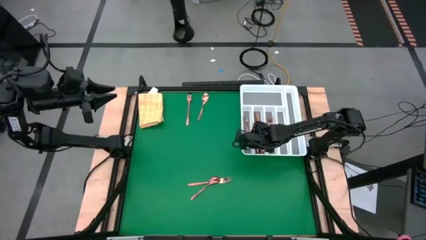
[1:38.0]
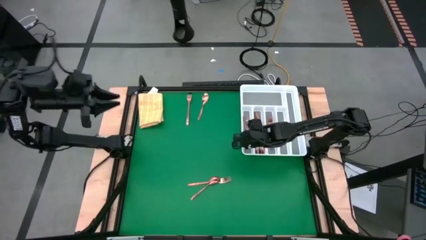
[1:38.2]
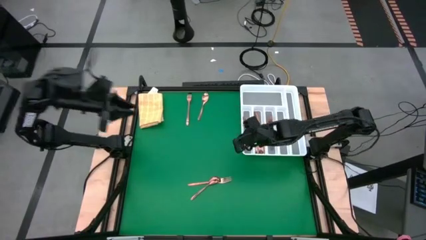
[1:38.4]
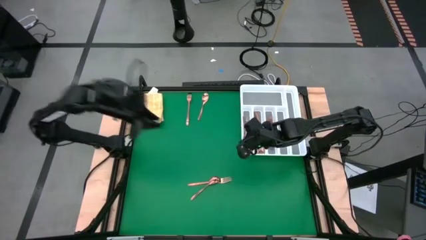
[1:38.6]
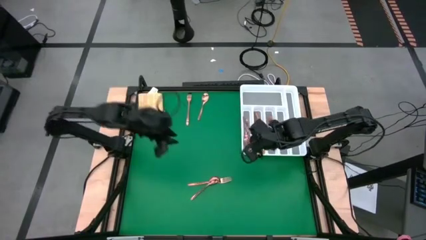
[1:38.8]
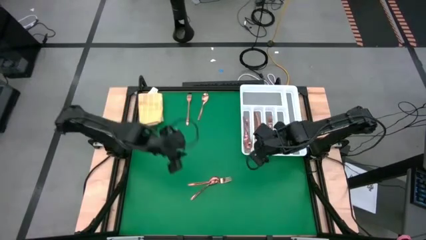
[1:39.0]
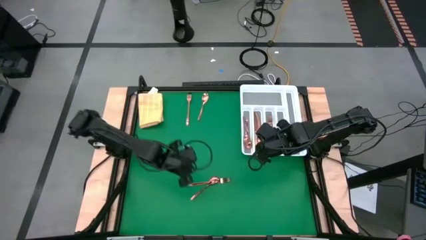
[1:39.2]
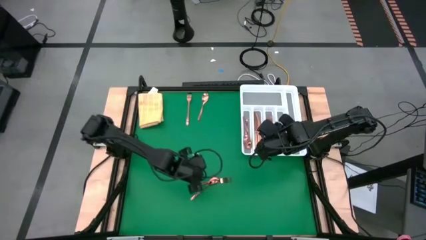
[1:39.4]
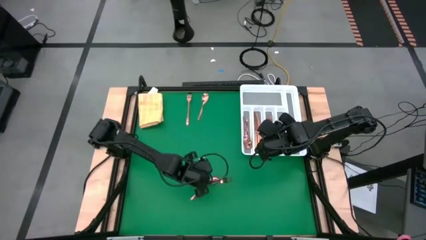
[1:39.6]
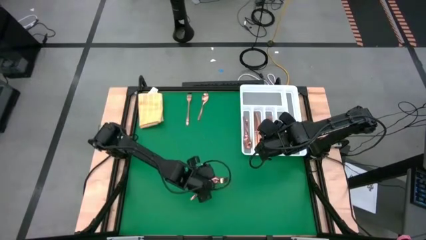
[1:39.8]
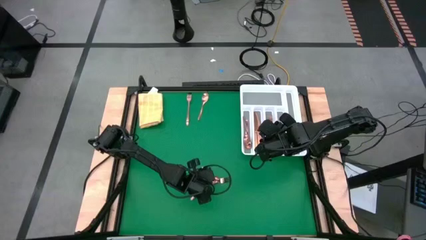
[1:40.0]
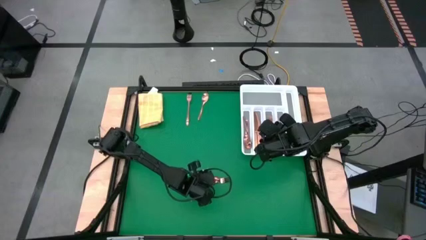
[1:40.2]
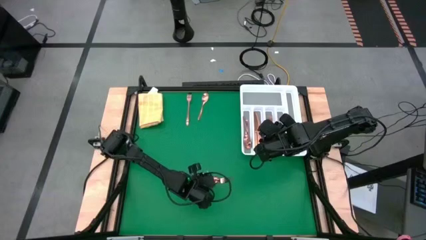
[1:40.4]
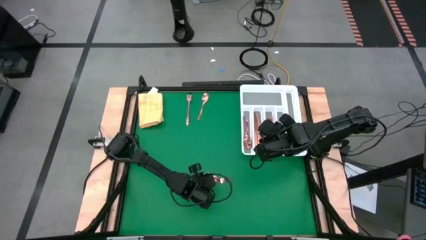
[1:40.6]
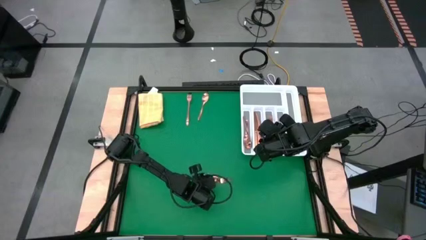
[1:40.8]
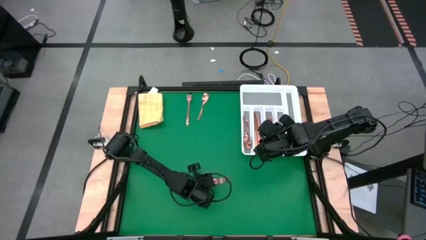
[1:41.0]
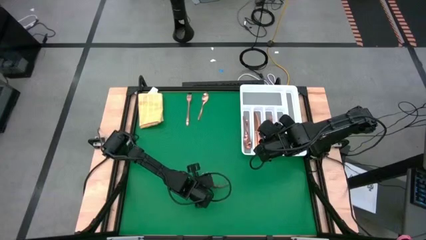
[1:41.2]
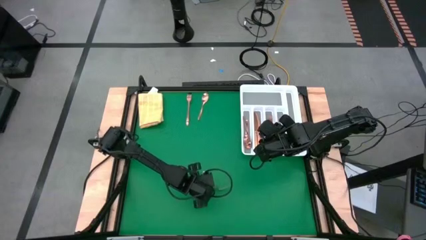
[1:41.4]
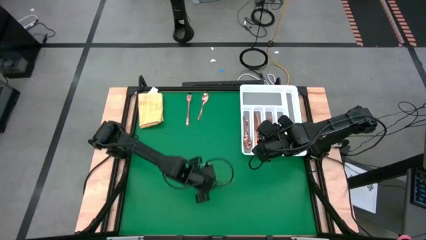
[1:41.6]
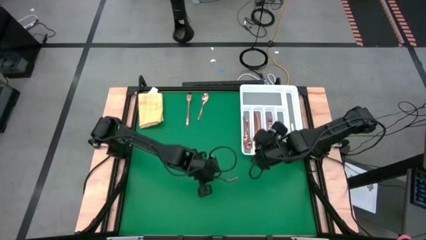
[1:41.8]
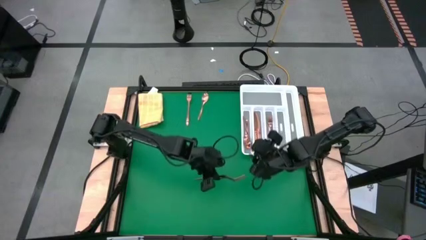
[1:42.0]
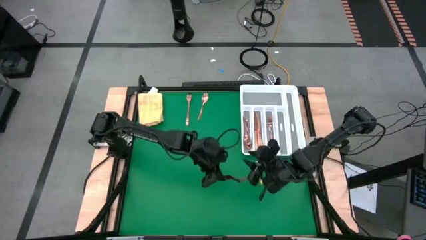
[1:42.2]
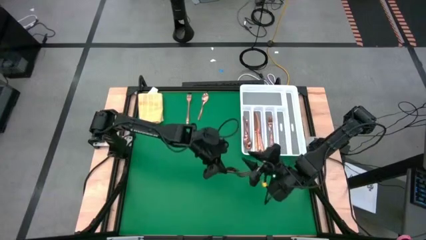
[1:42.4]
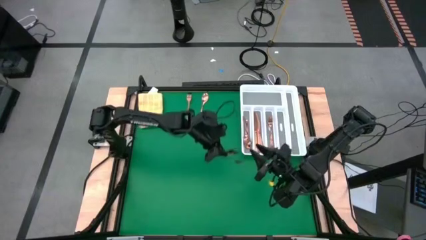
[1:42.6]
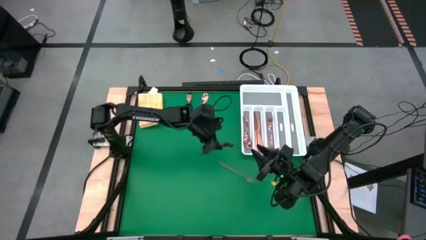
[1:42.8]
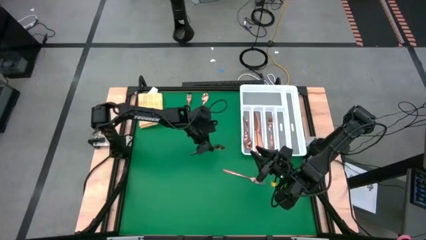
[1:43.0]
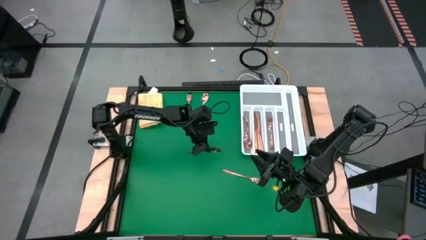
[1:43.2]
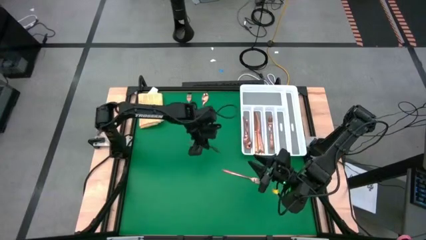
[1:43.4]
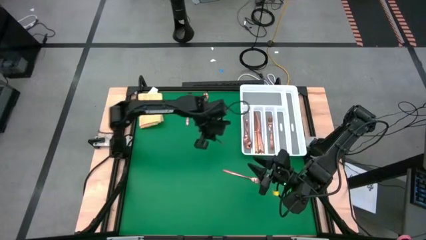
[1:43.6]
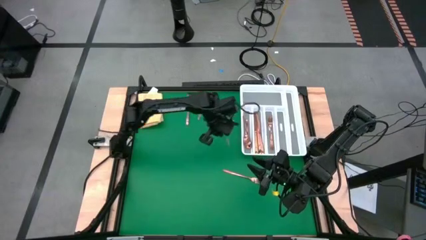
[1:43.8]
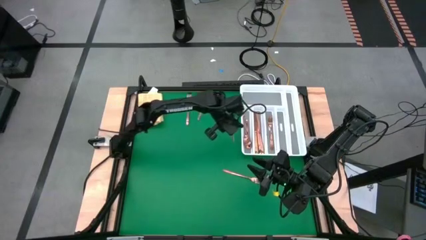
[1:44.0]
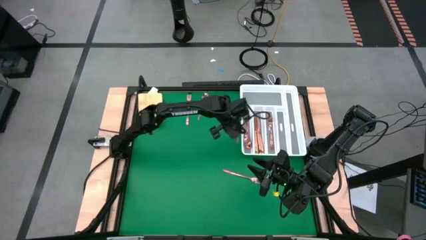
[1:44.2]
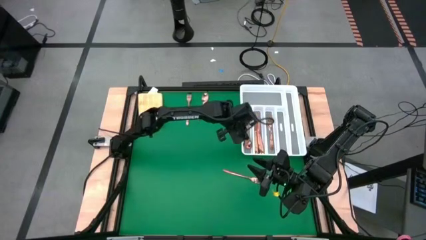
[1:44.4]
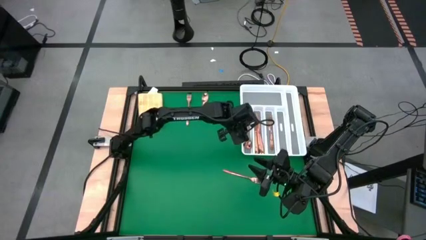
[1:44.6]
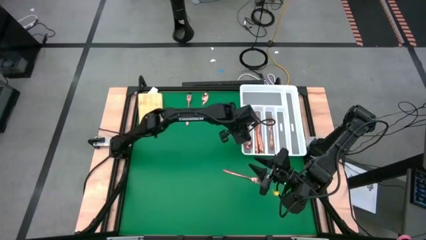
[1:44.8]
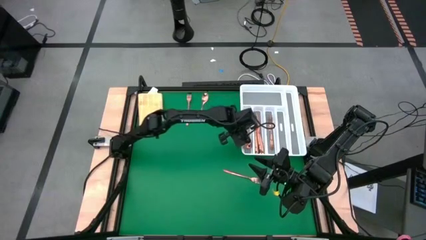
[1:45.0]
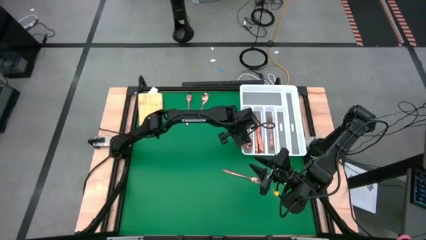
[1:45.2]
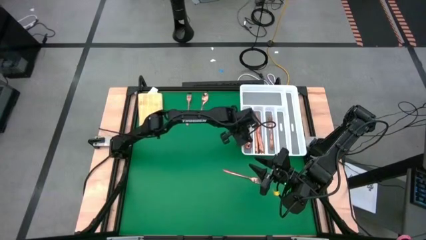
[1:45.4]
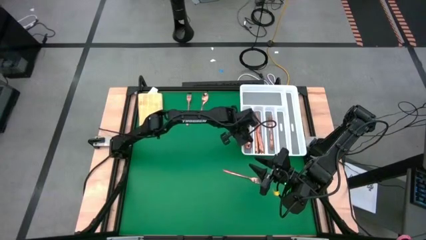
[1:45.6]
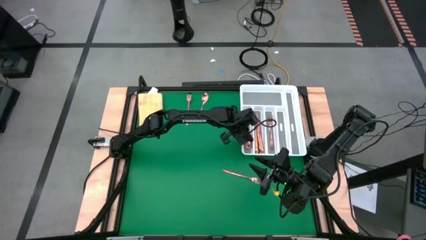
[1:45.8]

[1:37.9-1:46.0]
Task: Sort silverware
Put the bottom gold spoon into the silverware organizer

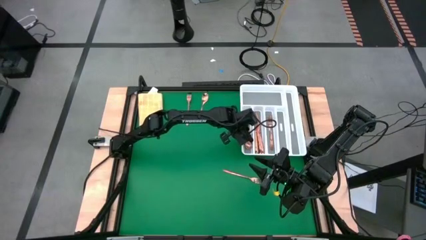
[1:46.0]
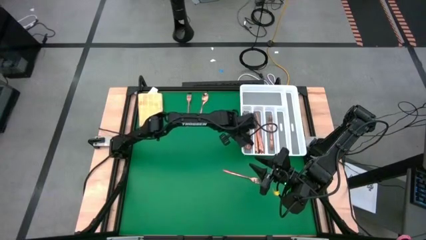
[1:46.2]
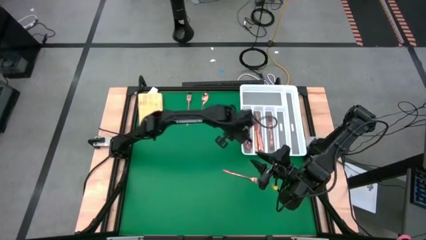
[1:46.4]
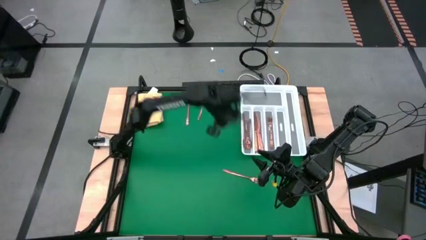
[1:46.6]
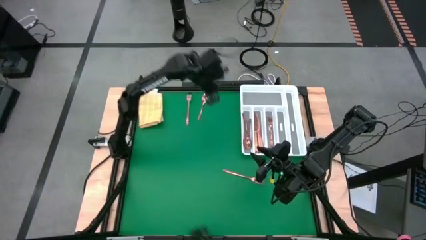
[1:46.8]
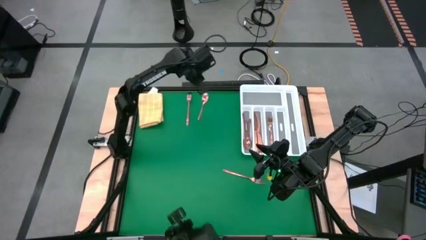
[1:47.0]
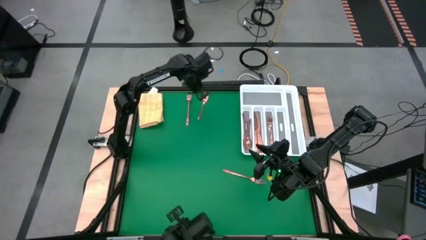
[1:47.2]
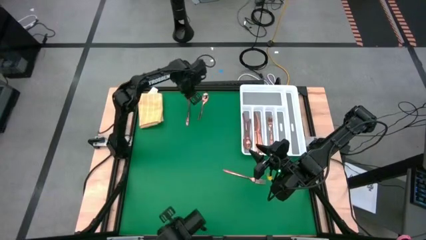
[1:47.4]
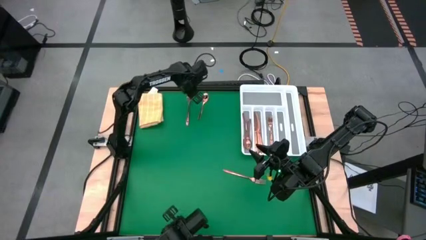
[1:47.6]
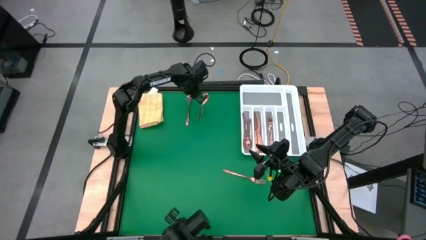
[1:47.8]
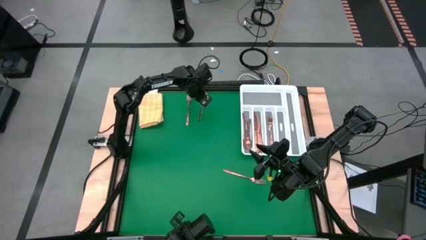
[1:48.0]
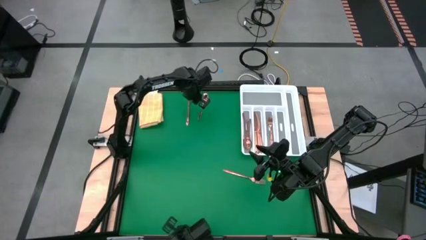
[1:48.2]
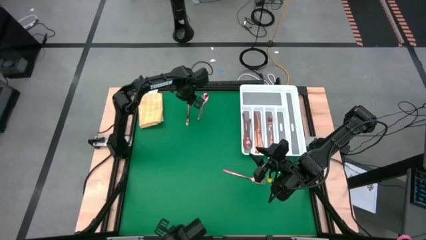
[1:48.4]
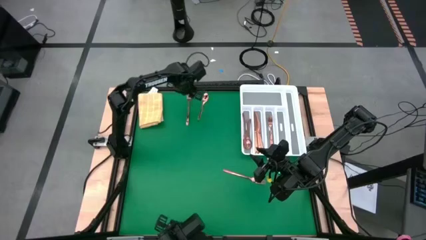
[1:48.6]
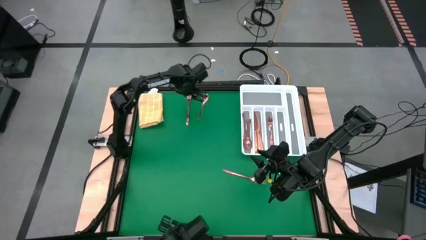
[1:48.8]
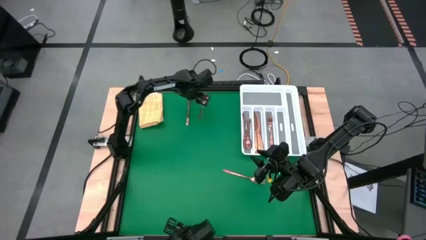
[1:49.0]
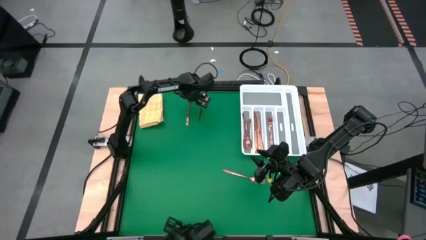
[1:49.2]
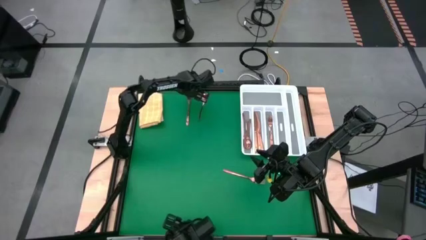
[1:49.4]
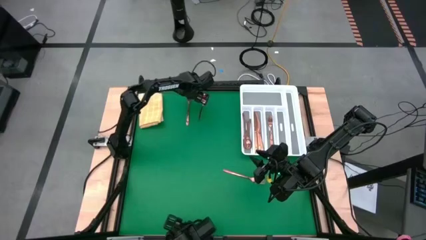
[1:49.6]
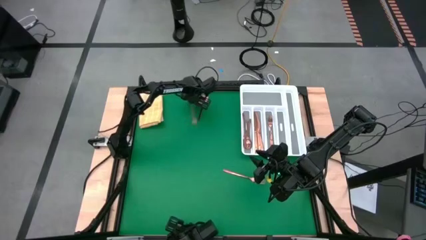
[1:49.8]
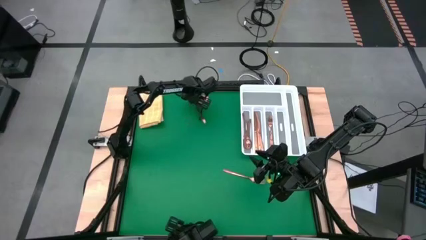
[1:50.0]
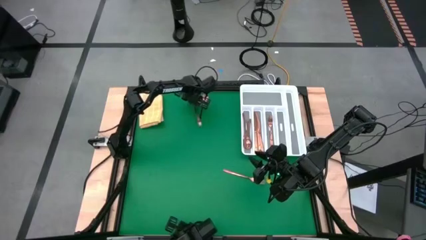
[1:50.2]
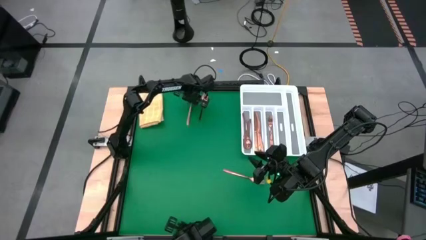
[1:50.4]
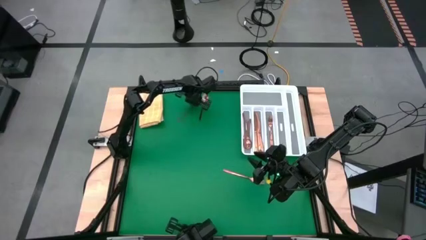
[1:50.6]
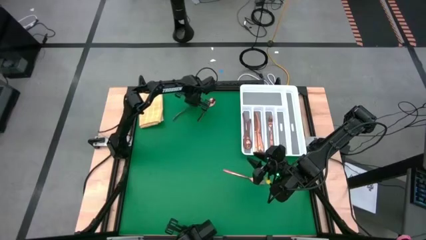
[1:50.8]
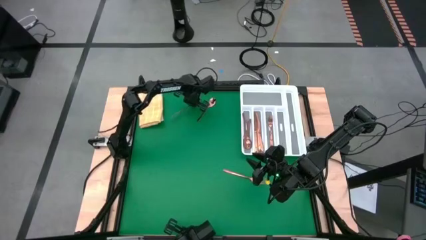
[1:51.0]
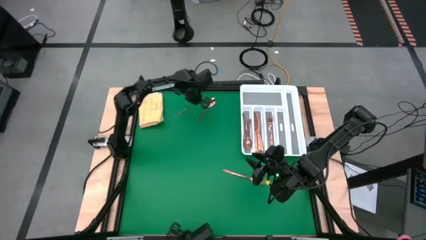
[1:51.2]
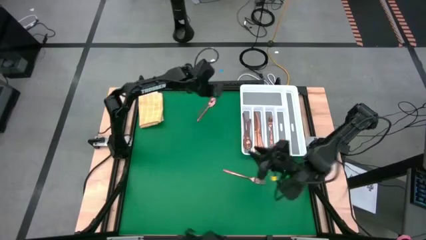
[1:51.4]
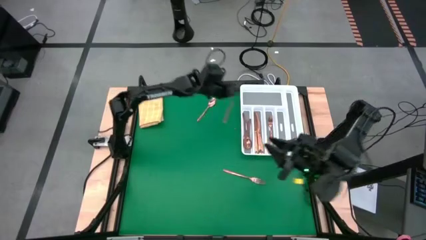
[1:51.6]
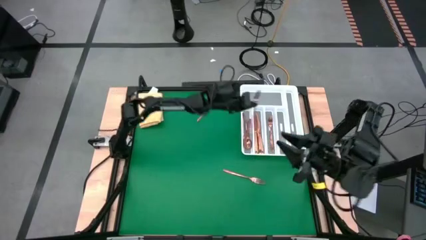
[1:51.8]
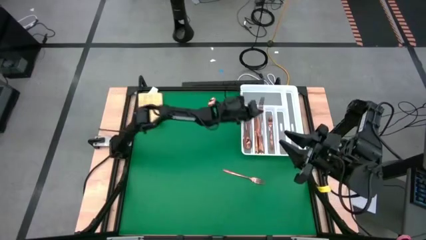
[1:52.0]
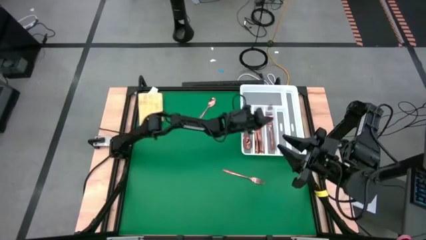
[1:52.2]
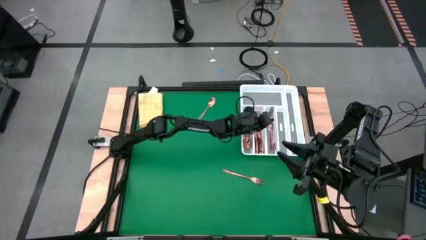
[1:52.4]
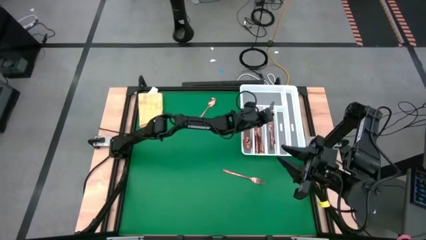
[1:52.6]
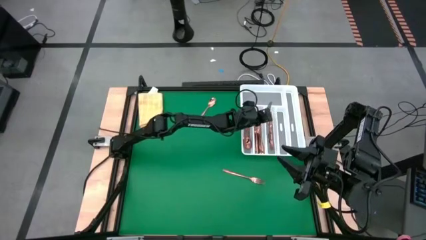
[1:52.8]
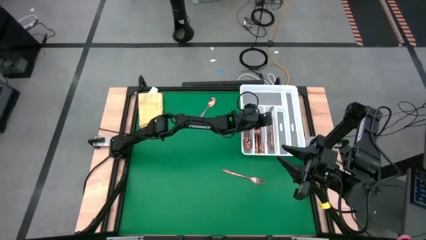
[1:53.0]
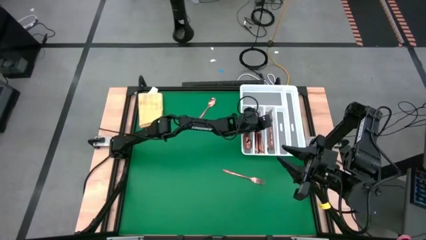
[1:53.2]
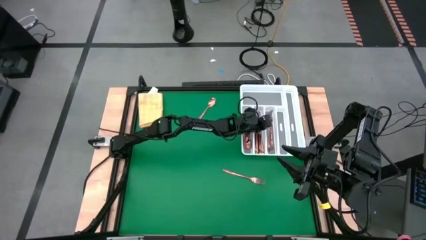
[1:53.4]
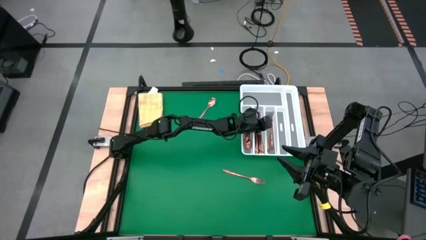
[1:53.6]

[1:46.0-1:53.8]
Put the top gold fork into the silverware organizer

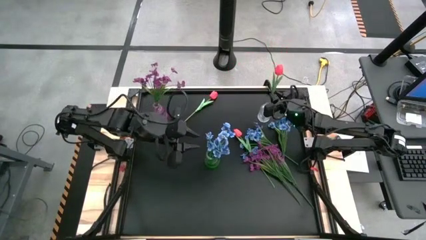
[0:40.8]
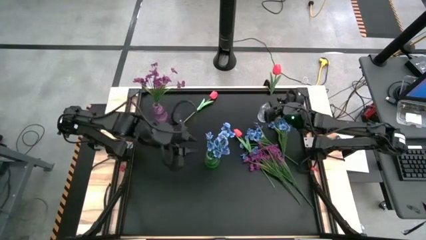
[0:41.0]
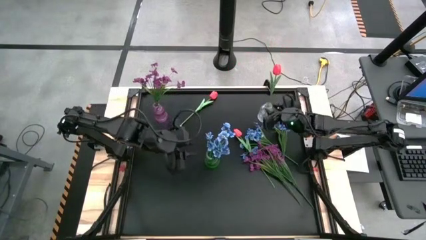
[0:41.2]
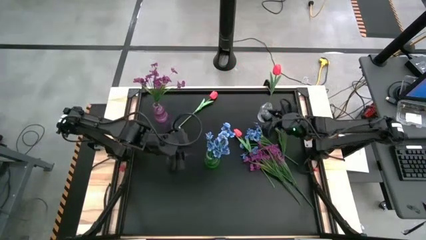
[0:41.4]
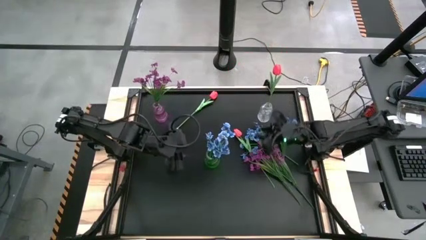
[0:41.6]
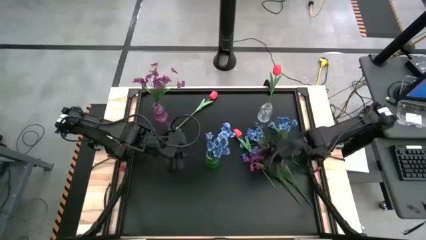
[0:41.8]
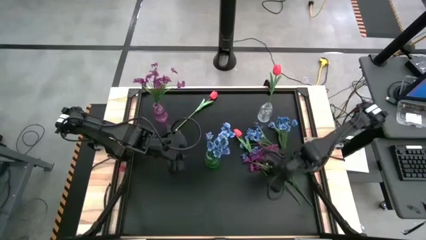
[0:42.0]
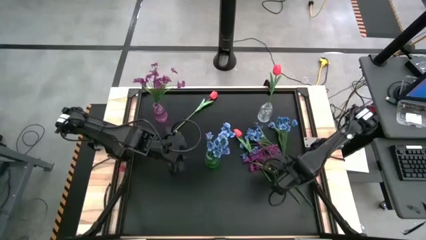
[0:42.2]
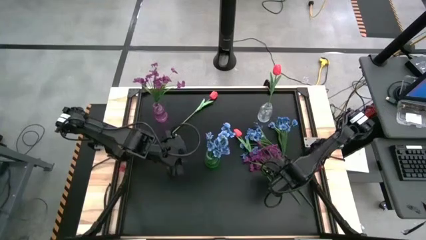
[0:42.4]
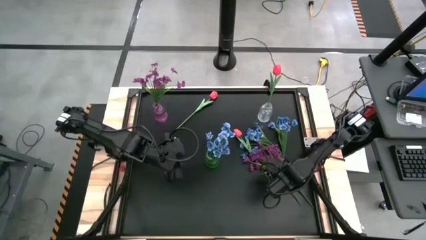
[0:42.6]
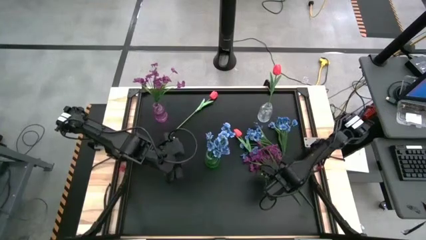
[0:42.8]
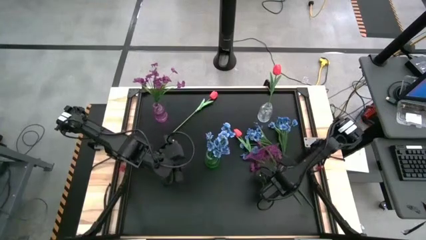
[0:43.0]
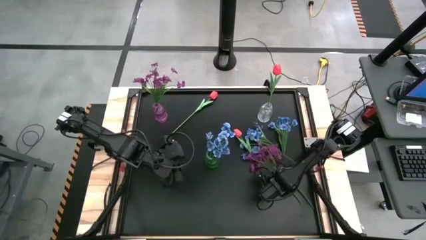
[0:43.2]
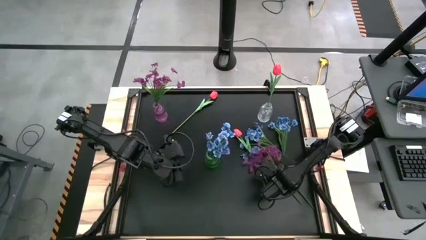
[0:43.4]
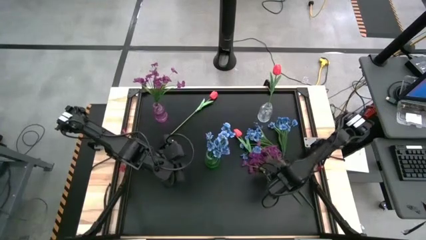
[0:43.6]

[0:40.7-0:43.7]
Task: Sort flowers into vase by color
Put the left purple flower into the purple crystal vase
